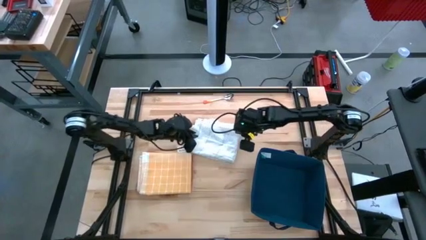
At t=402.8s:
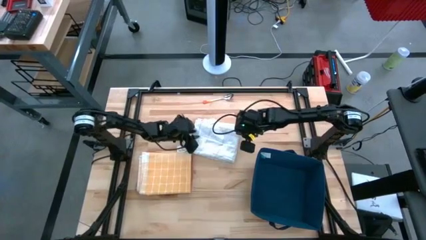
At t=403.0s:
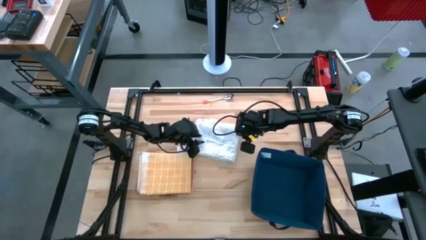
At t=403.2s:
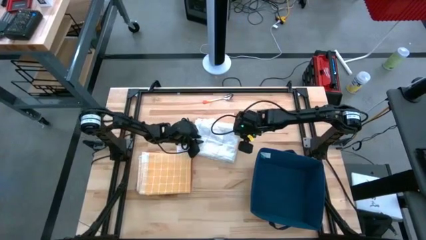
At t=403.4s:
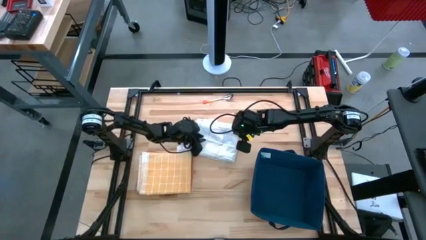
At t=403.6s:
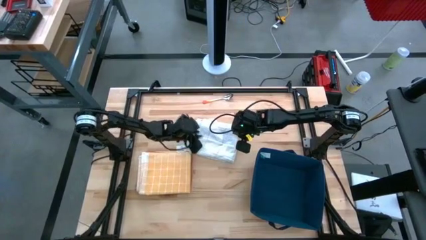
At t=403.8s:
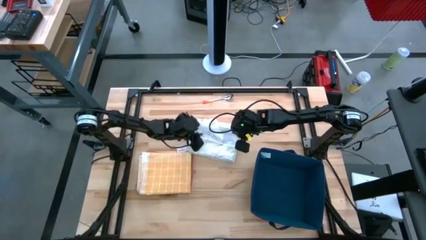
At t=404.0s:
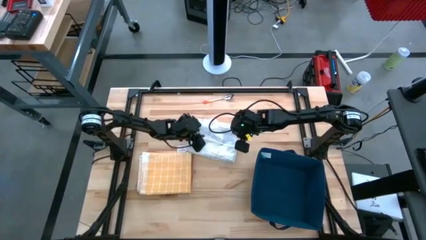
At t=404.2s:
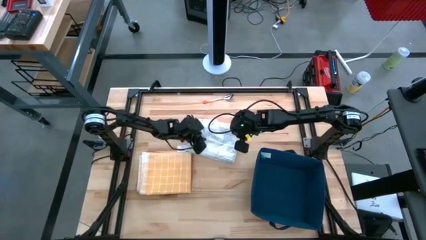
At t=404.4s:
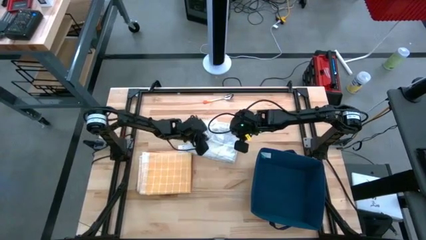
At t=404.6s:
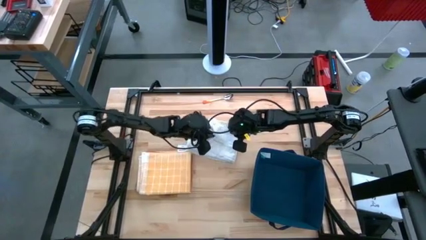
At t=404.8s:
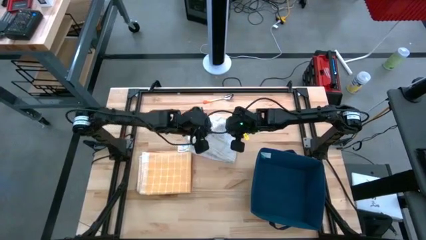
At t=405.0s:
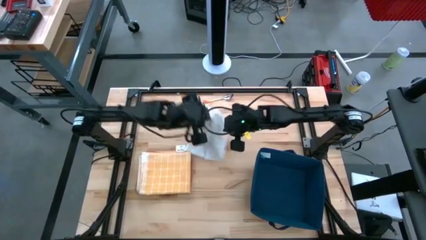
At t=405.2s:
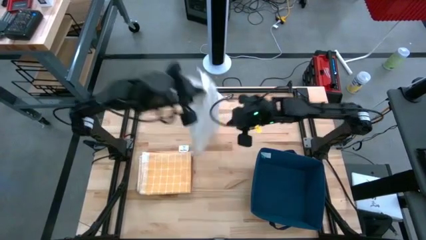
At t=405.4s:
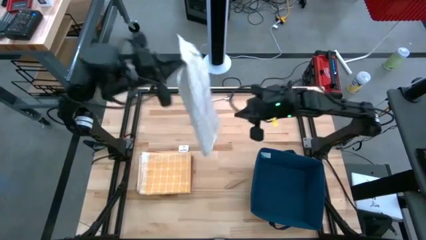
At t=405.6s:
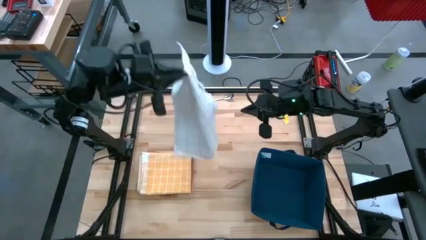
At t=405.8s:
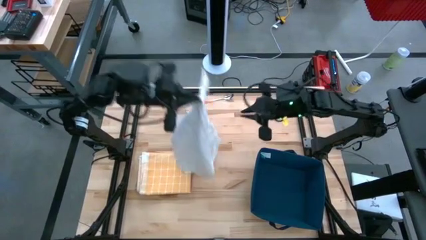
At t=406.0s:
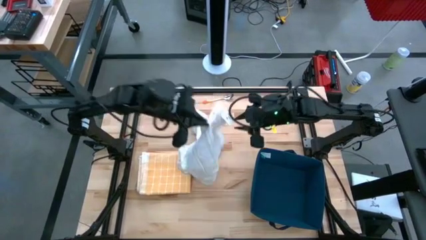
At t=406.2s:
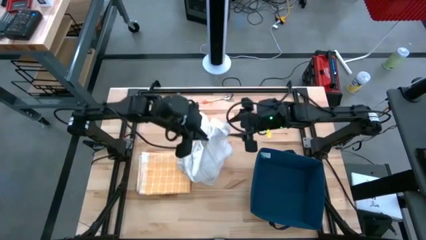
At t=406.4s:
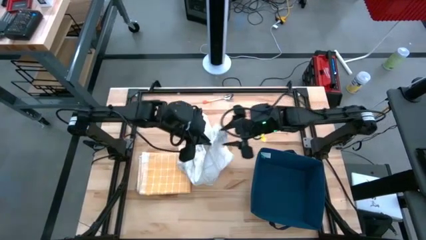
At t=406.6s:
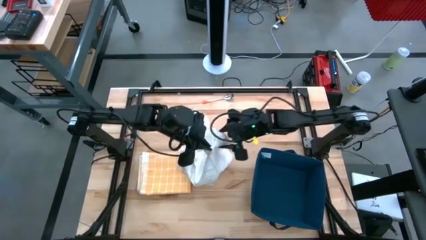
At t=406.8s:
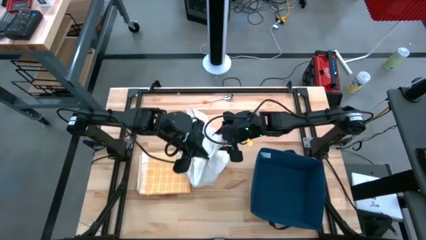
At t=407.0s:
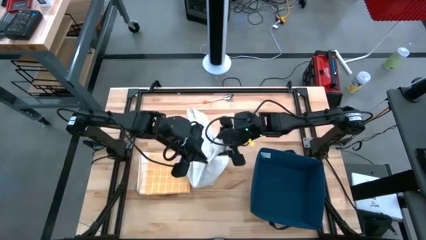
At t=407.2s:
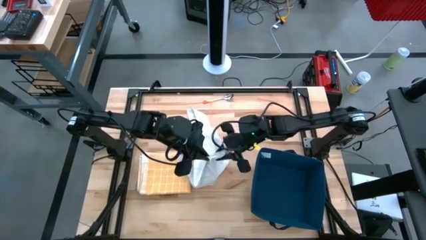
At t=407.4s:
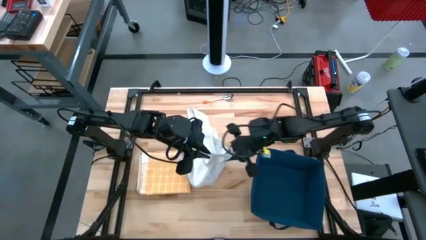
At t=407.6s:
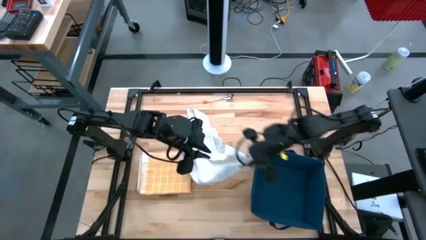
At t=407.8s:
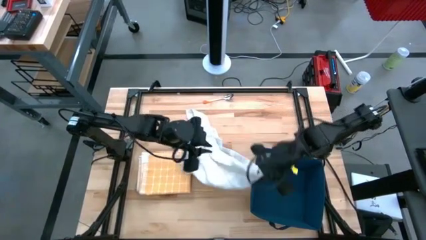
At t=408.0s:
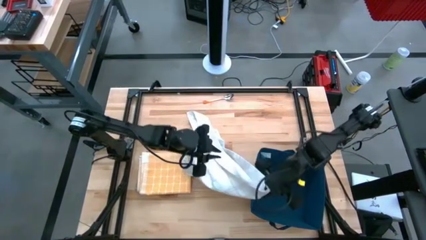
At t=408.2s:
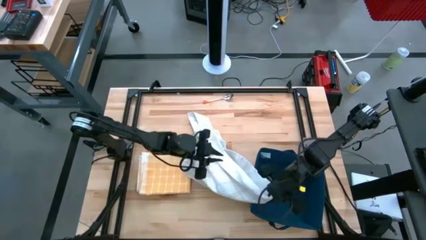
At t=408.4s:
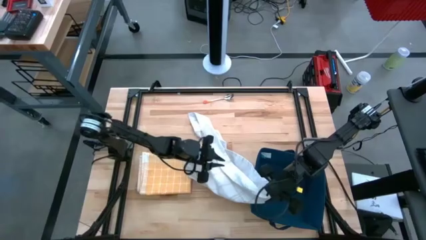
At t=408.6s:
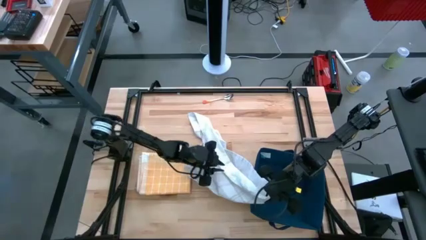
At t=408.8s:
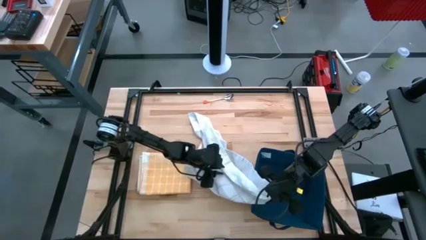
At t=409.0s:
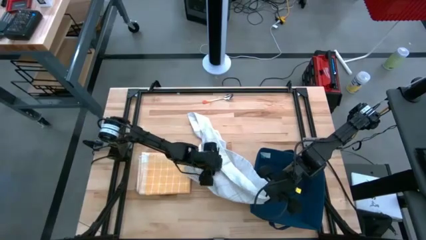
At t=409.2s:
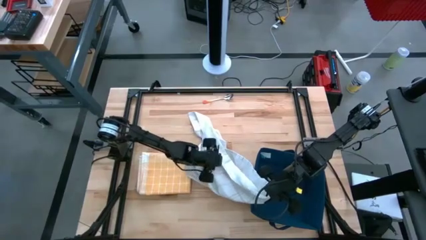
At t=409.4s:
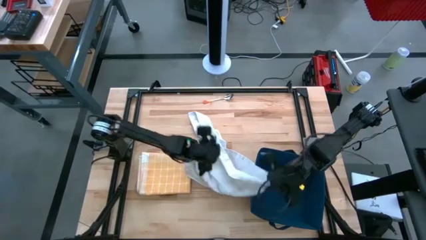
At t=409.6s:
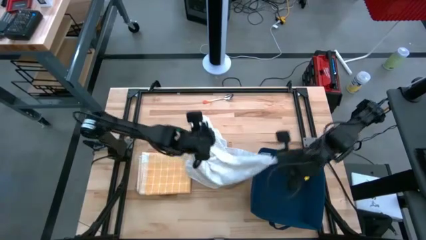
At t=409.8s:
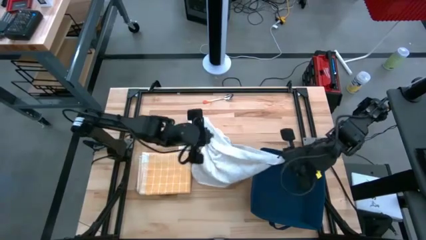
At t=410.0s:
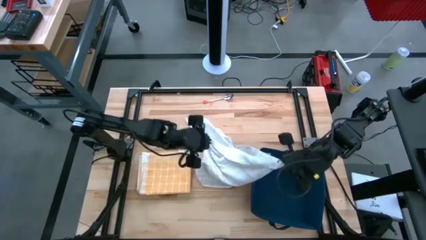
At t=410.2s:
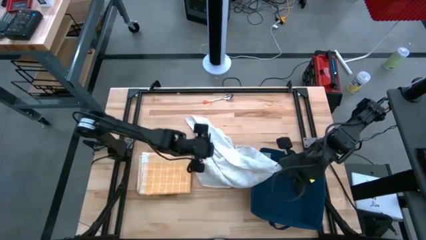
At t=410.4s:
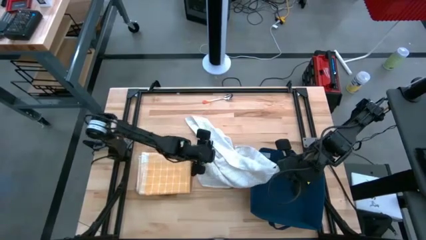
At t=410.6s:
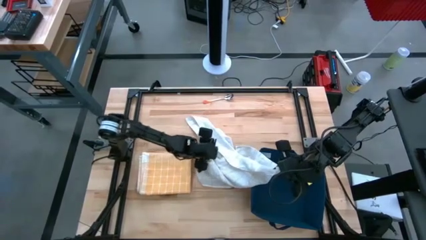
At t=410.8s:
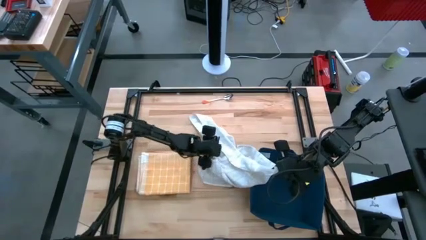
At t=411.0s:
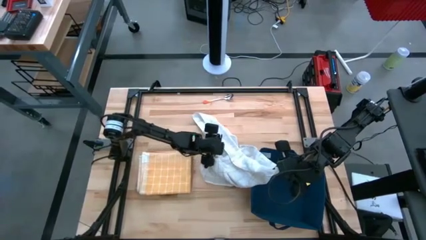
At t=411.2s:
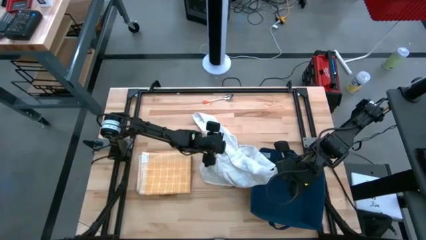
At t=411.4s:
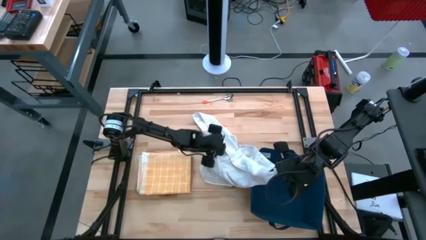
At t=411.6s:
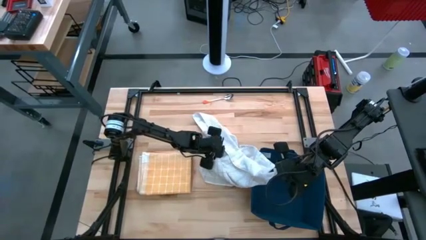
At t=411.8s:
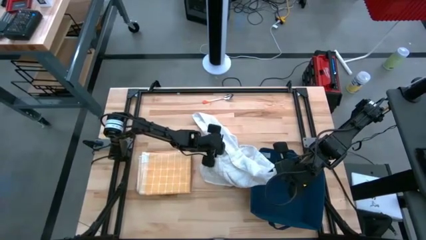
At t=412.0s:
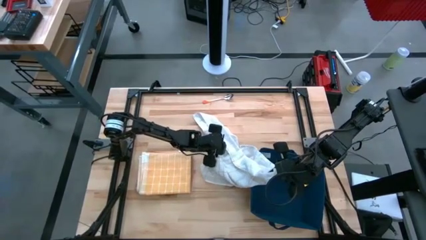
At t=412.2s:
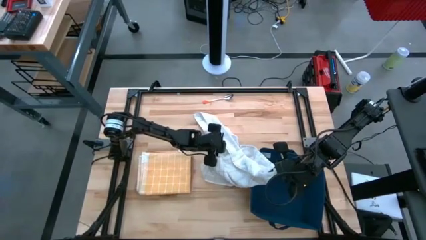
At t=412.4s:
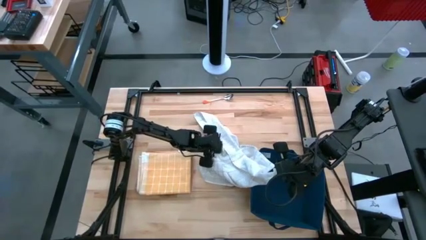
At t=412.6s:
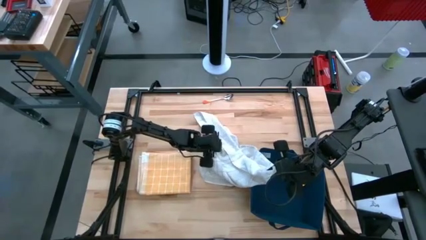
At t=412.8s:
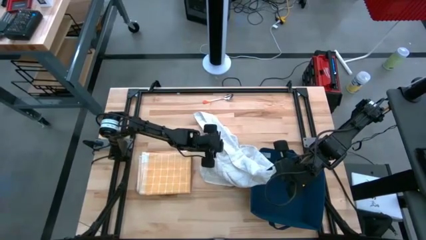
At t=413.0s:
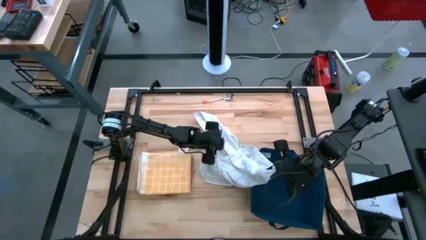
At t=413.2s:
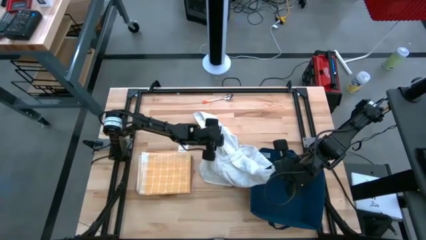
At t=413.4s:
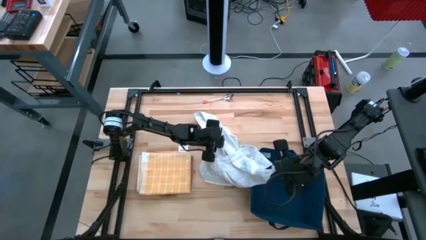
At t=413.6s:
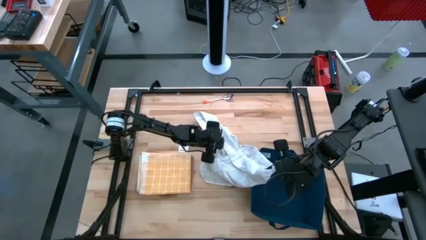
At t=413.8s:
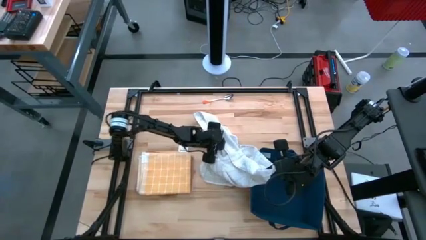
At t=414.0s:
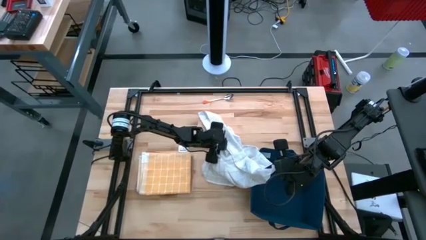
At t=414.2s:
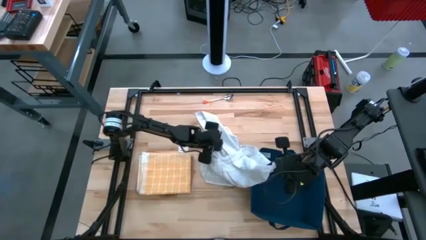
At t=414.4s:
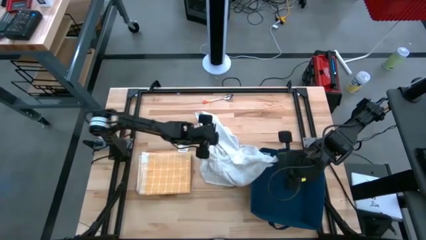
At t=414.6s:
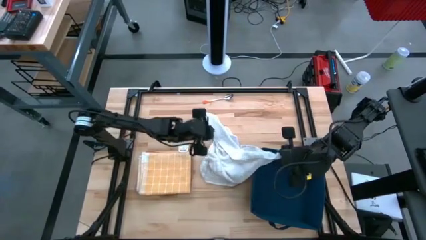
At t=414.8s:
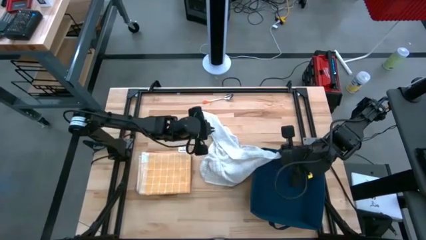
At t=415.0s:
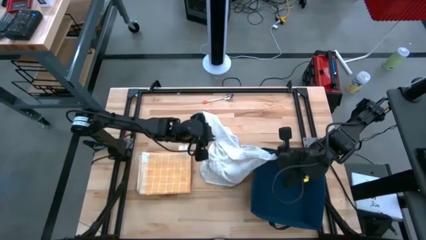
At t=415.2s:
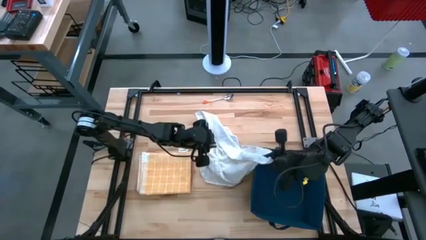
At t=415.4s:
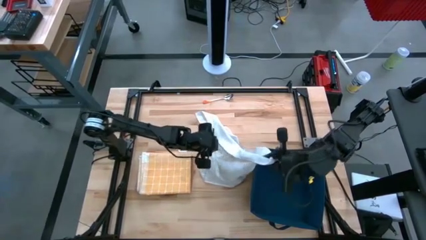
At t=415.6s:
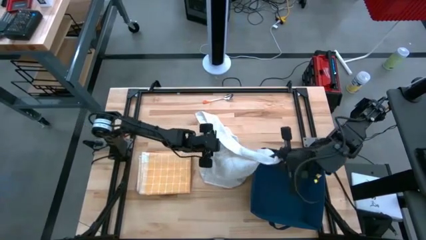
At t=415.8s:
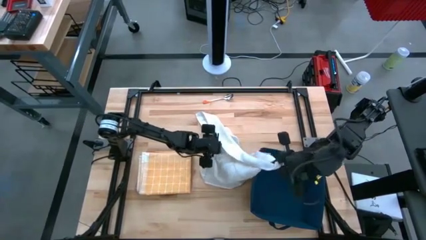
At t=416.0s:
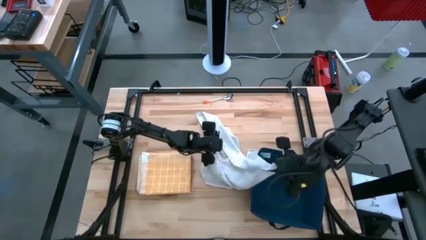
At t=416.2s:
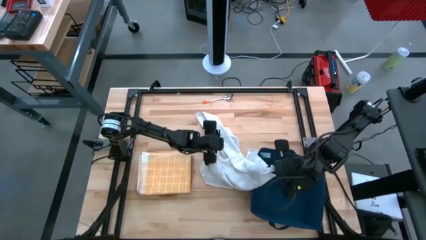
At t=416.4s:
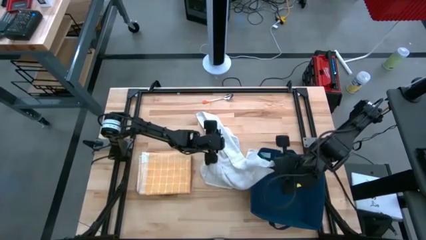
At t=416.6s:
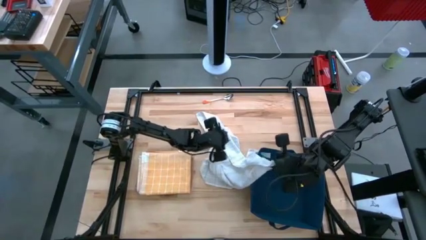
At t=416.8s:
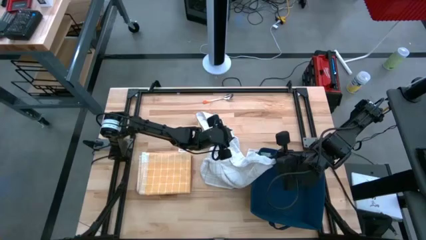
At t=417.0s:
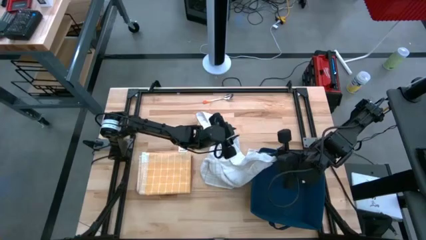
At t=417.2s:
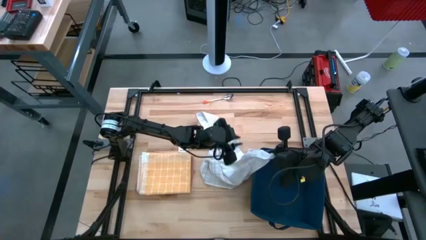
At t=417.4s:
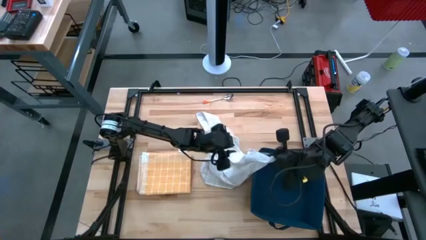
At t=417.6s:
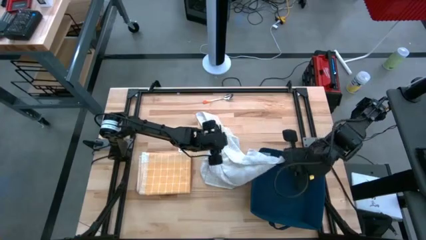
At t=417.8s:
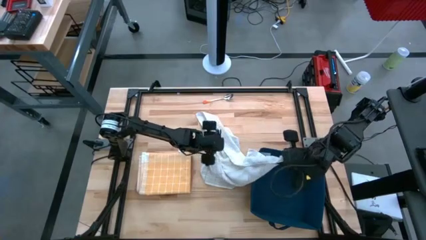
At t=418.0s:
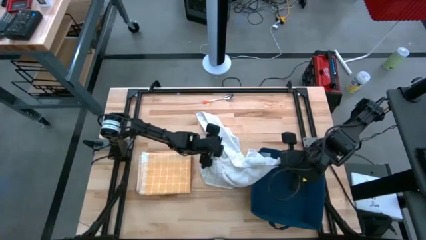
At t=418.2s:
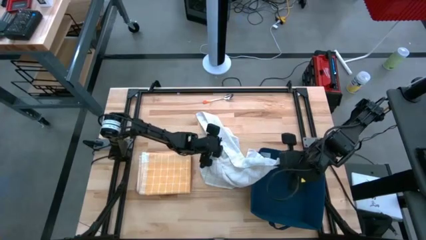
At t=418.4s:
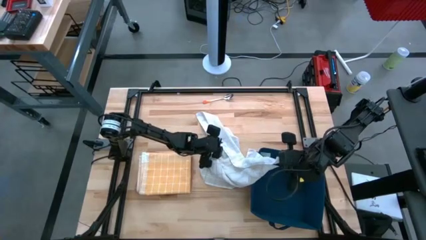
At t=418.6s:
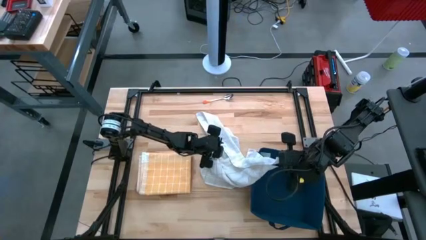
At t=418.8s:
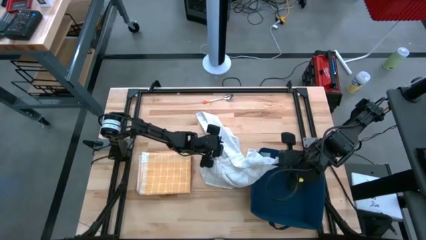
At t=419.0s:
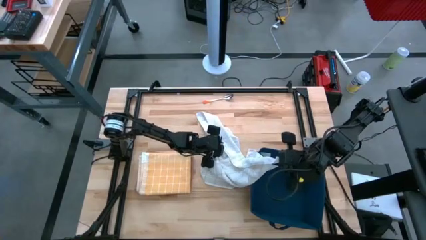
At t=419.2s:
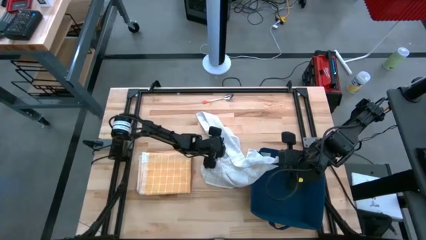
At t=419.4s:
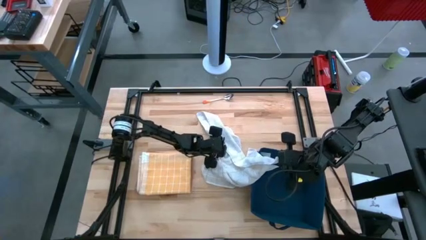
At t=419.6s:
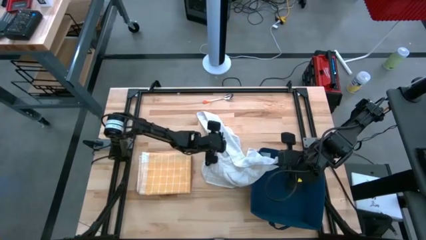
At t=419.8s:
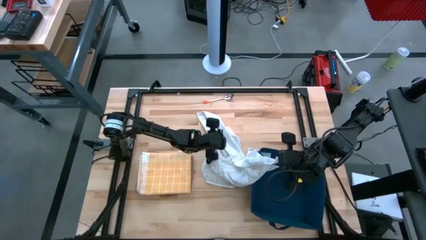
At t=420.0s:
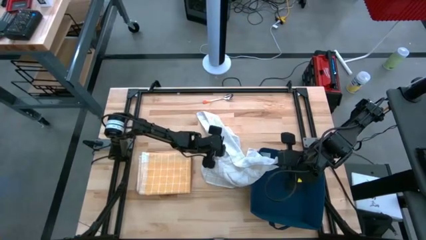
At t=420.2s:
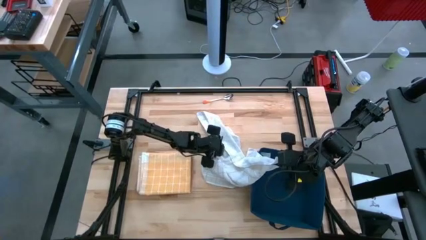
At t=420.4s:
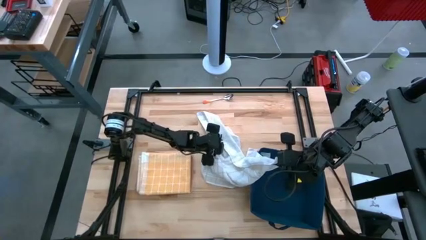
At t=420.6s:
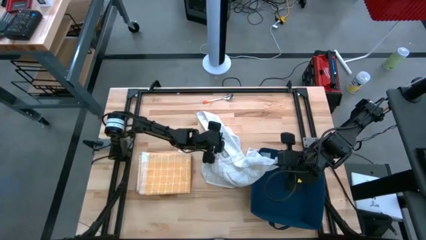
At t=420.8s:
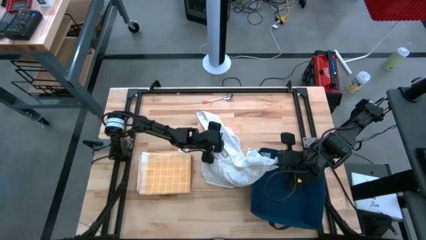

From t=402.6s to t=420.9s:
Task: Fold towel
Fold the white towel
